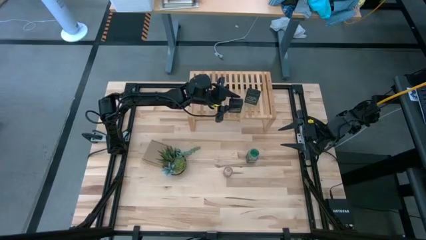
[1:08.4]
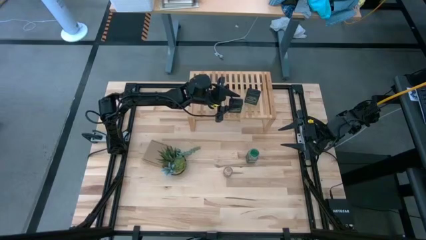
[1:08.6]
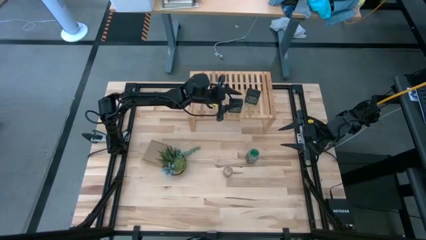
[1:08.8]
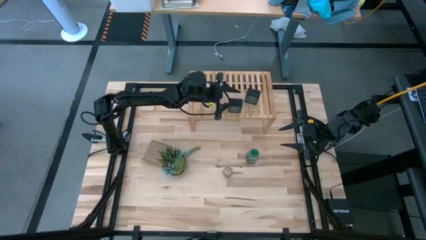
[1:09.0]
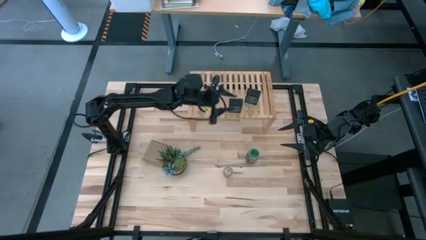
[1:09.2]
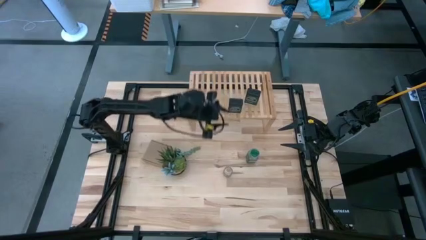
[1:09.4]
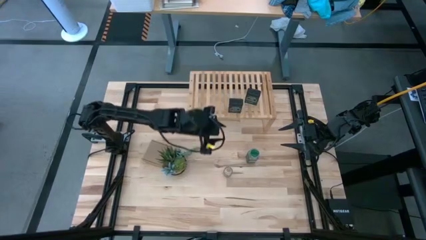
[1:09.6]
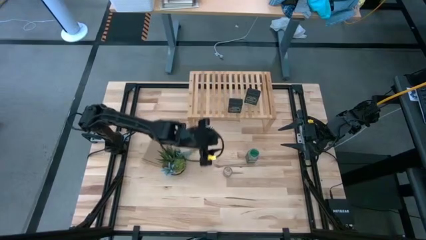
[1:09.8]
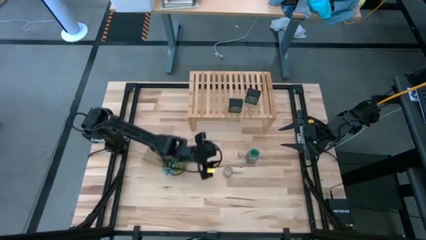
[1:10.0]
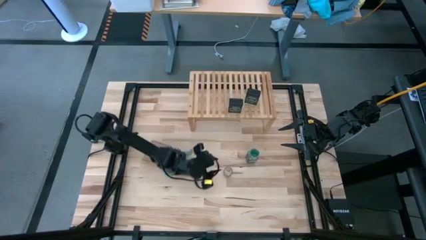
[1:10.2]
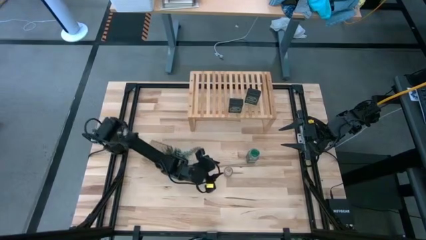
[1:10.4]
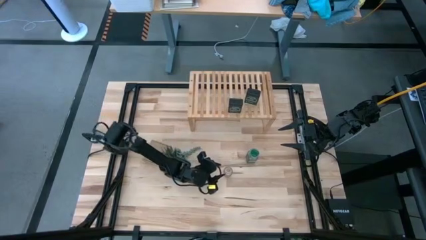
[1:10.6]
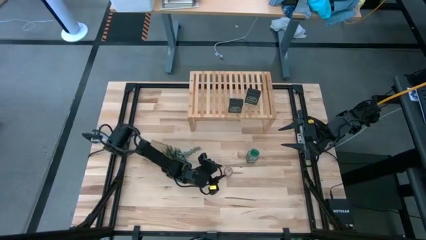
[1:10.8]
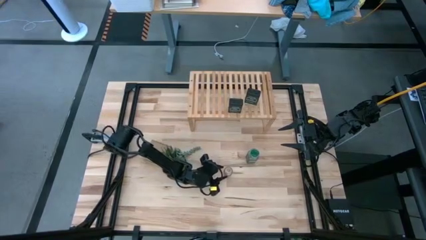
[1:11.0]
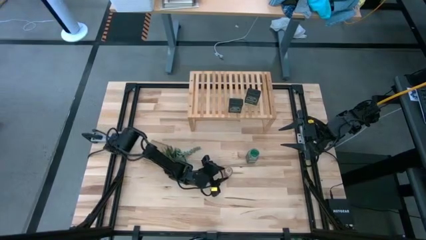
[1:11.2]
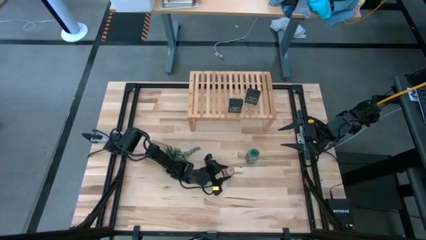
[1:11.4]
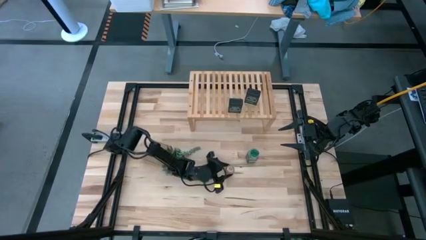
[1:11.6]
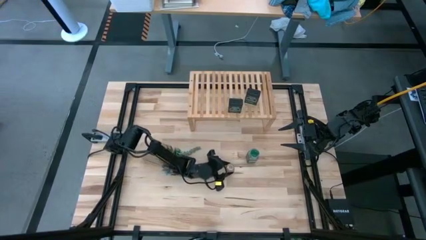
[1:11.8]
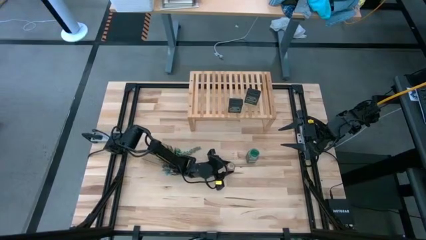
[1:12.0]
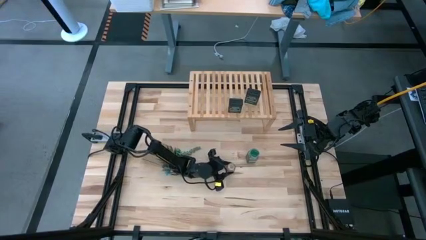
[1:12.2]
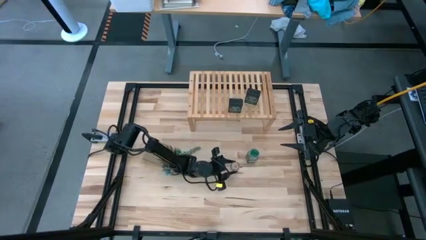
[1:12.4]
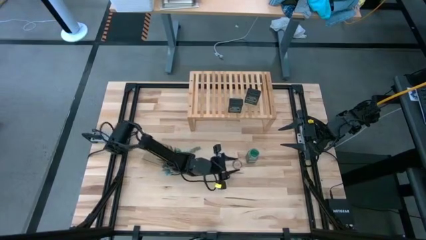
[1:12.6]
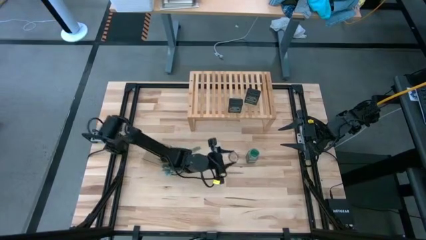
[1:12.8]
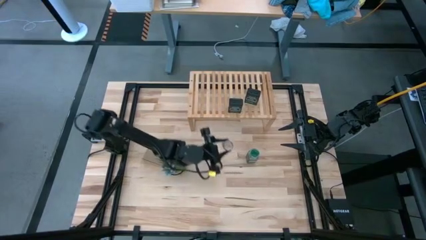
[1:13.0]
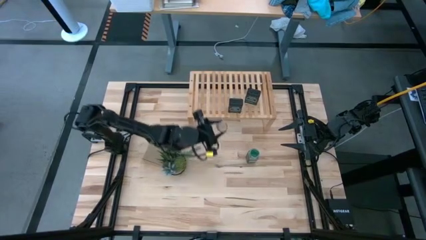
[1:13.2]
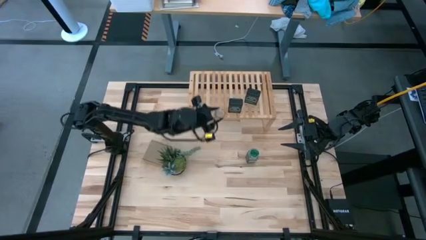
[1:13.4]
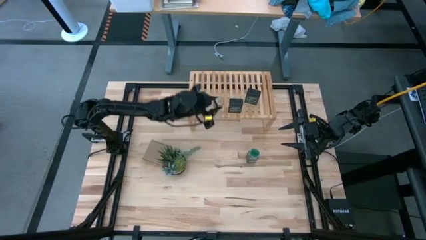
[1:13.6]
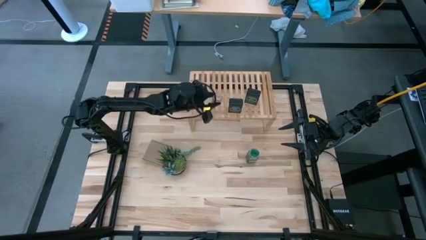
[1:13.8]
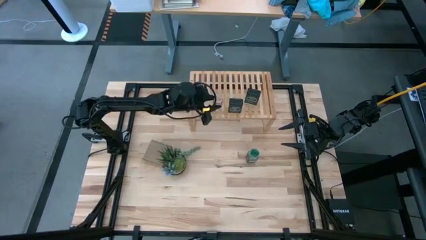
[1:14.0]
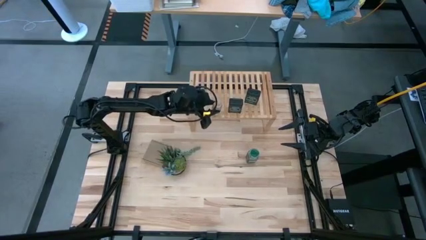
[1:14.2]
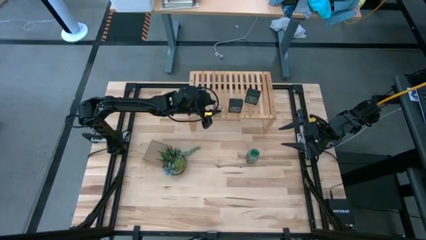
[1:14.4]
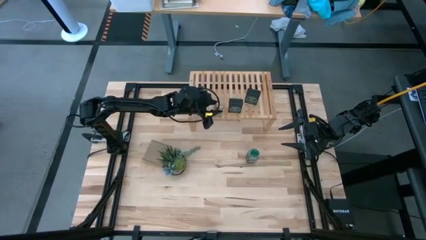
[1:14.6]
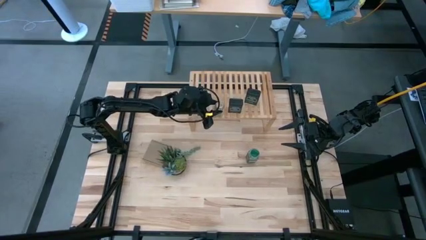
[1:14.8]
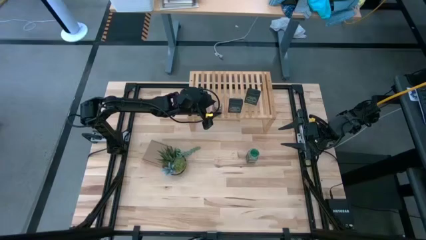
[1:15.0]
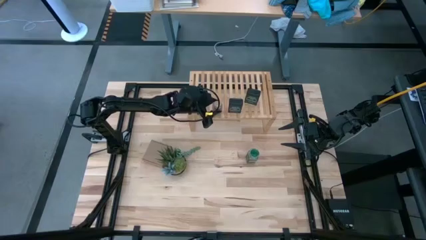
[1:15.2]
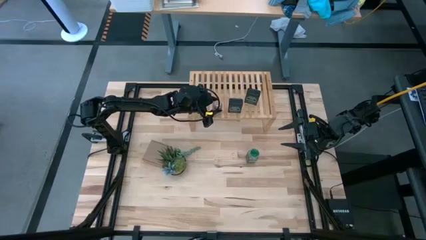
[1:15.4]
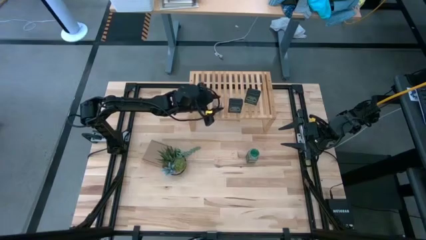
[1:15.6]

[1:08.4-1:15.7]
Task: Shelf spices
Put the transparent seasoning bottle on the shelf

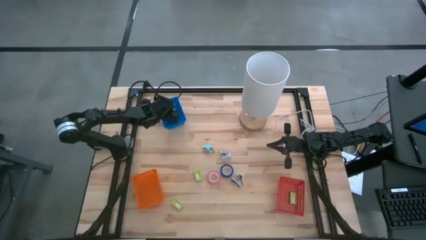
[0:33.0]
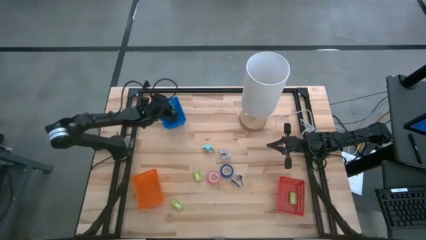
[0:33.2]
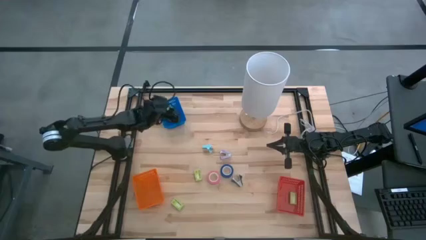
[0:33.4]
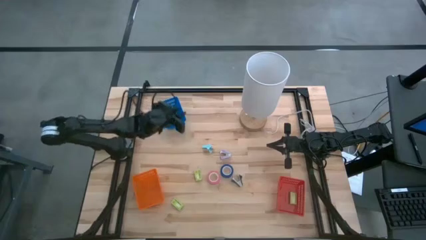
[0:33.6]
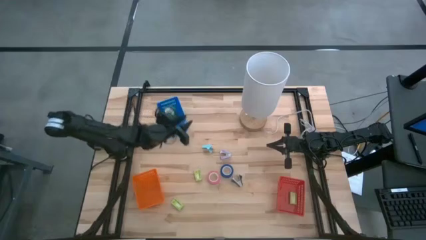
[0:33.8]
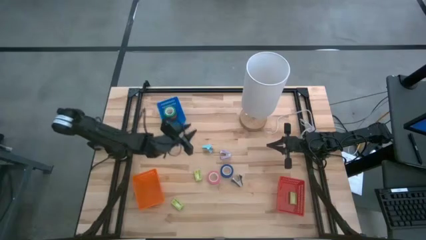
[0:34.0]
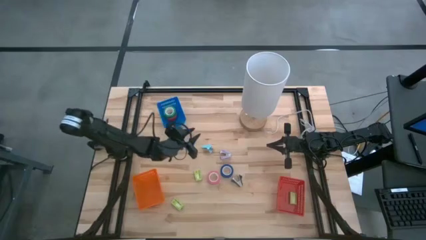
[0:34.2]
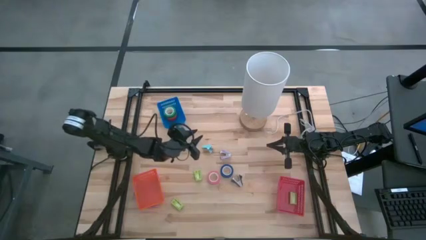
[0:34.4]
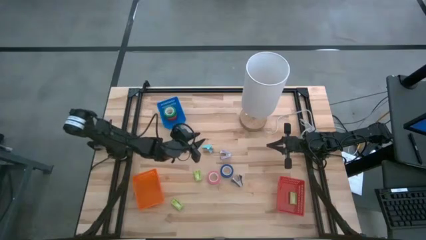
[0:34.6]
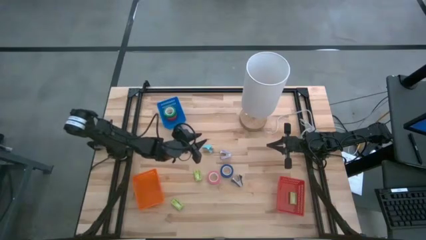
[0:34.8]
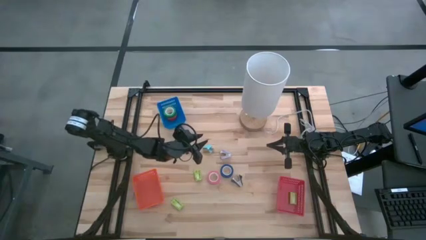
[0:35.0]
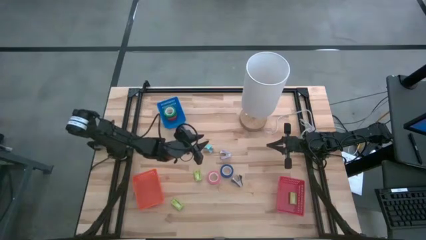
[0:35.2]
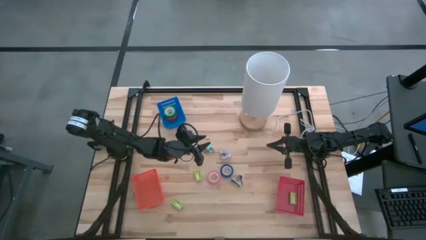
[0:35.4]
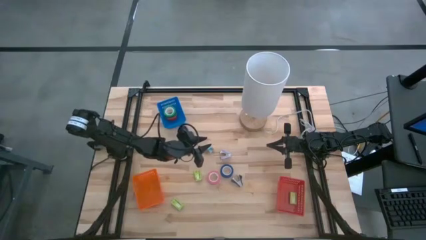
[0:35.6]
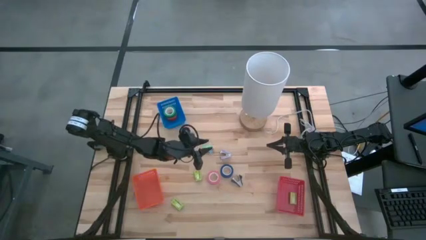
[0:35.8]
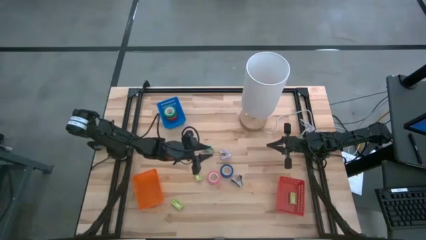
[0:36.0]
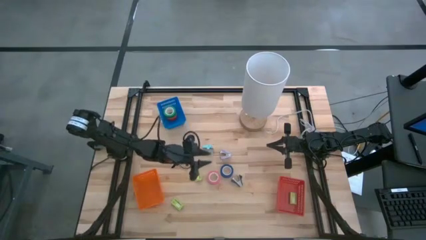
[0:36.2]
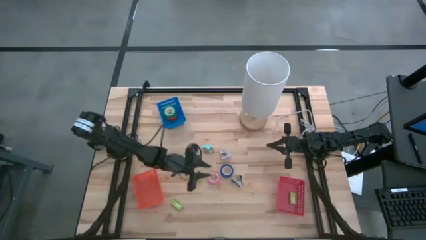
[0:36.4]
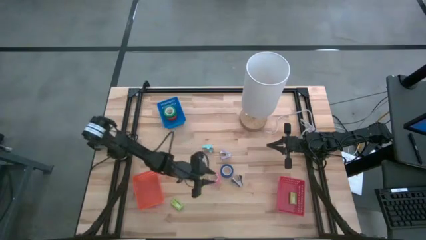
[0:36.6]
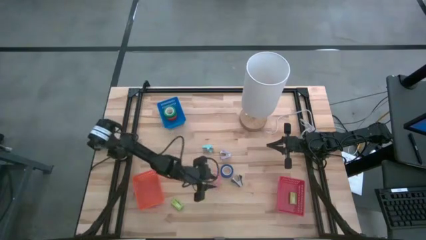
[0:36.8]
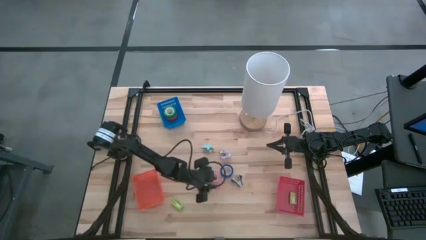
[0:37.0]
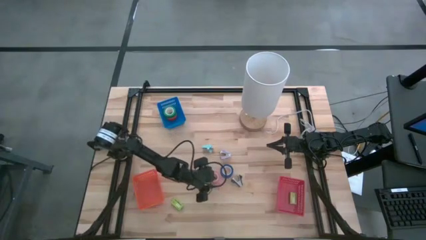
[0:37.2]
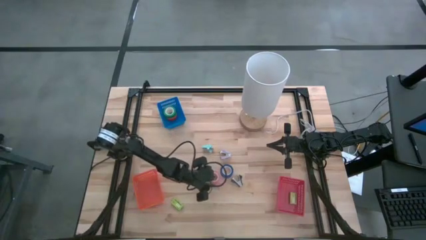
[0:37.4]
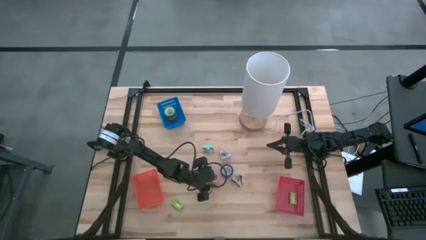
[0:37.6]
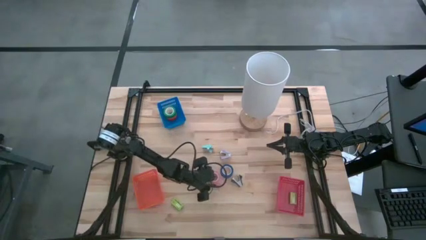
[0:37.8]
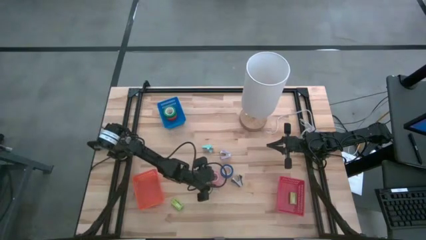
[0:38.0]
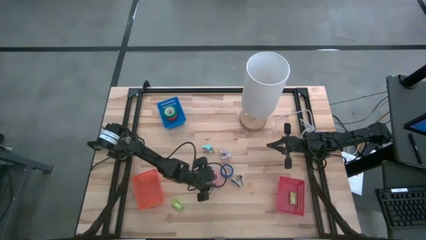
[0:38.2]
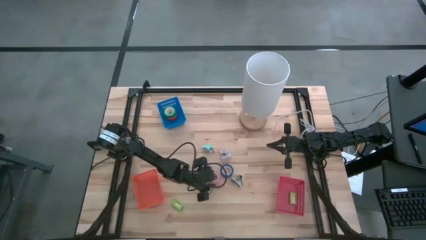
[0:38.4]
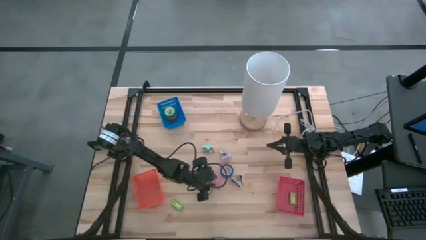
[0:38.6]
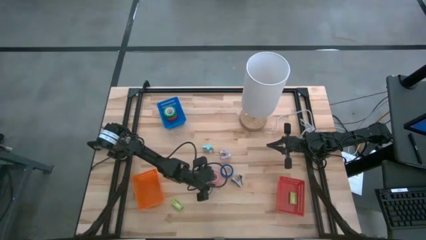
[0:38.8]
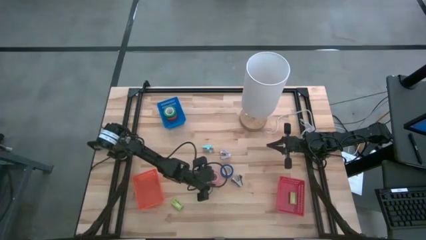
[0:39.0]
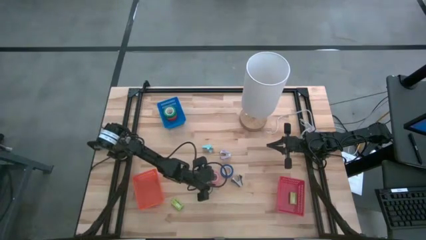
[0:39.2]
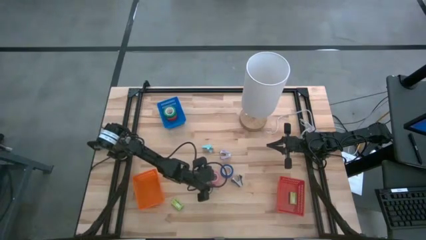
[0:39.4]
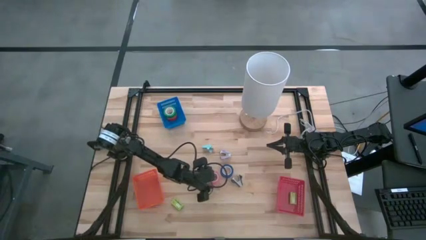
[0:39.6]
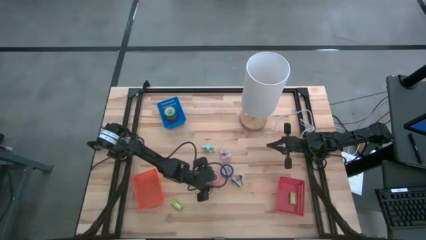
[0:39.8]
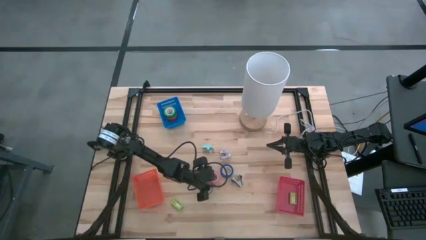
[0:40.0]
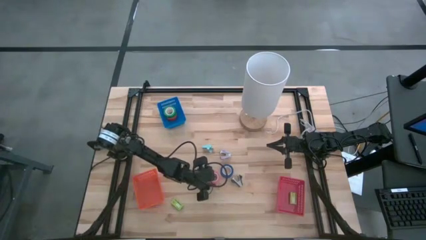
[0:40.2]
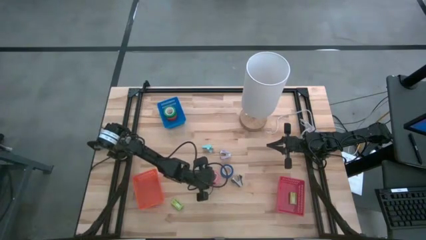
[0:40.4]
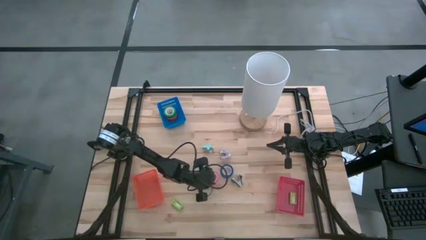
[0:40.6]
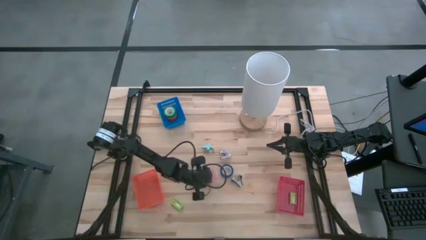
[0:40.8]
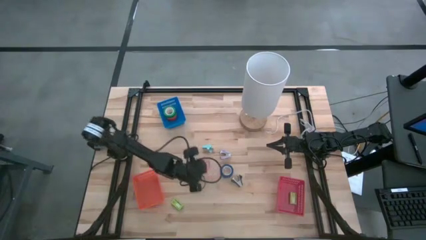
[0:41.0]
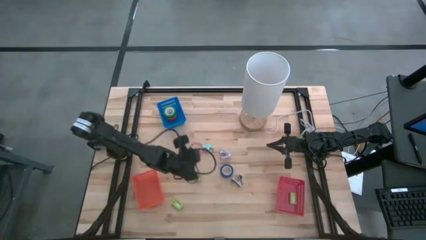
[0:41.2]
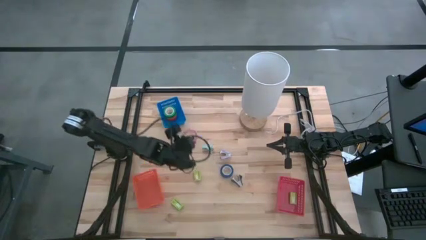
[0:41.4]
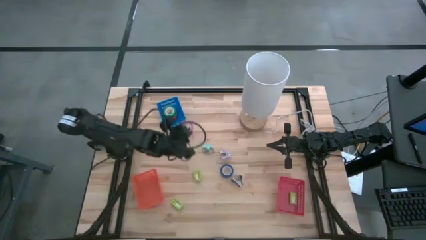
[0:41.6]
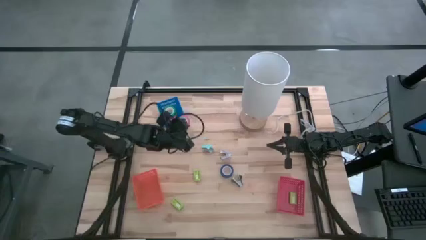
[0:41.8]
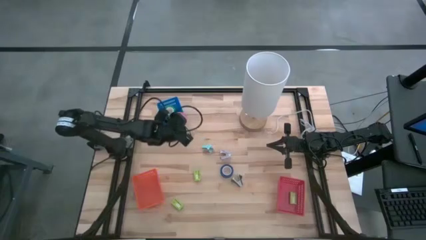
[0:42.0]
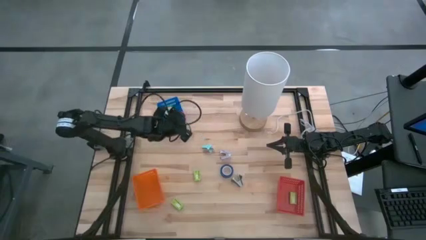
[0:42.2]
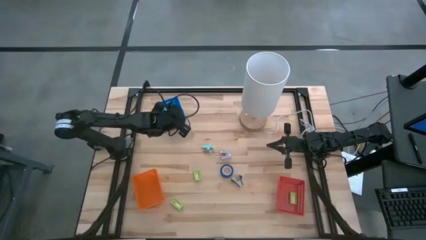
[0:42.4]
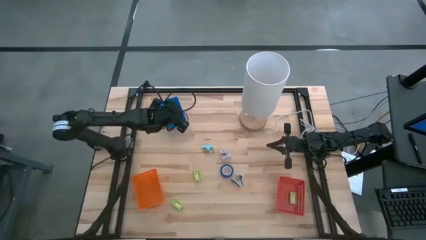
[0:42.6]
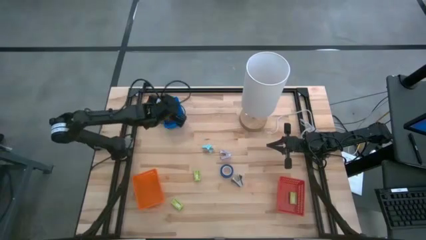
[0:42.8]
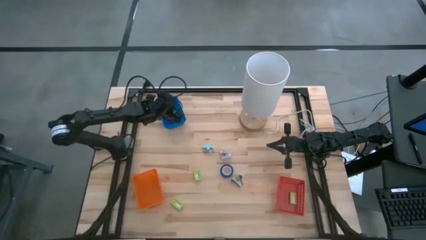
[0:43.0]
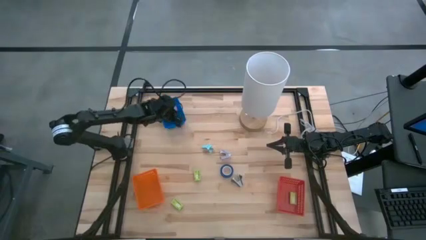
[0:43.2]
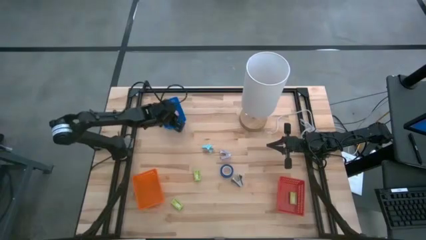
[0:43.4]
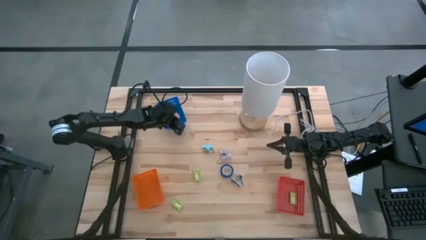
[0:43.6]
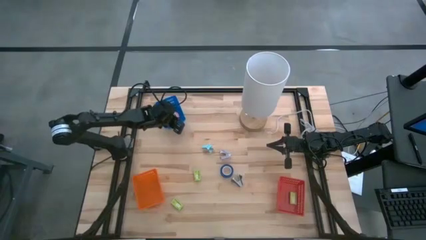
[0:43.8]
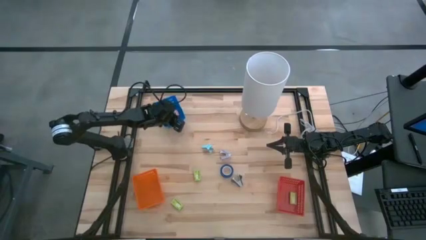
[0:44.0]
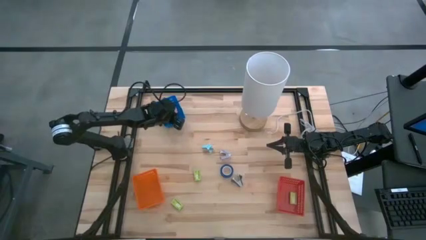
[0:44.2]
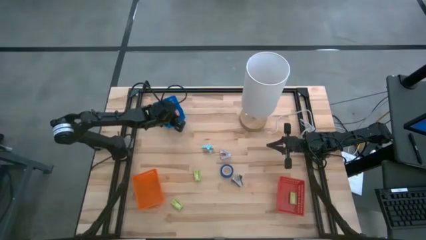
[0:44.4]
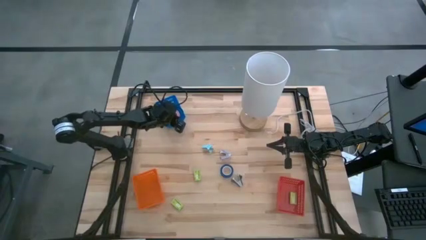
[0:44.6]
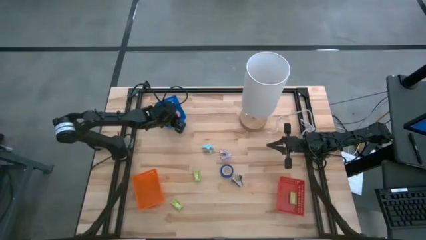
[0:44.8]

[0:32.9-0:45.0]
Task: Pick and place Stapler, Stapler remover, tape
Put the pink tape into the blue basket
